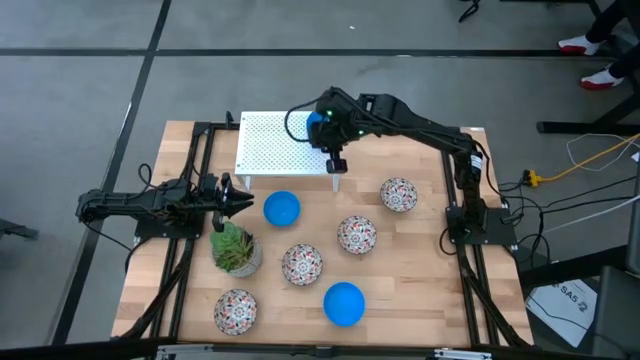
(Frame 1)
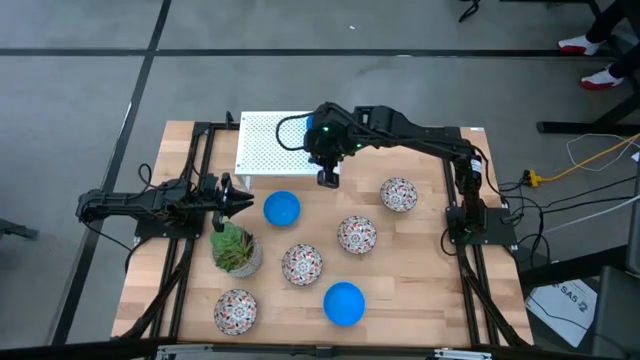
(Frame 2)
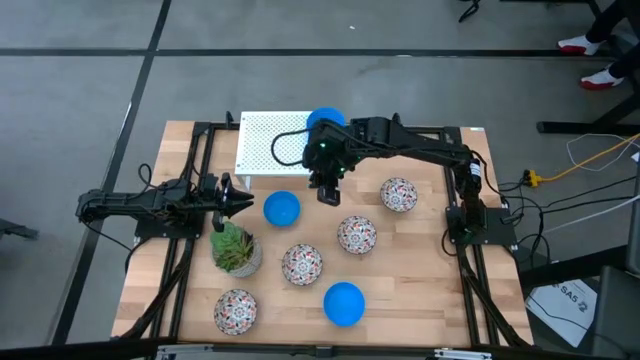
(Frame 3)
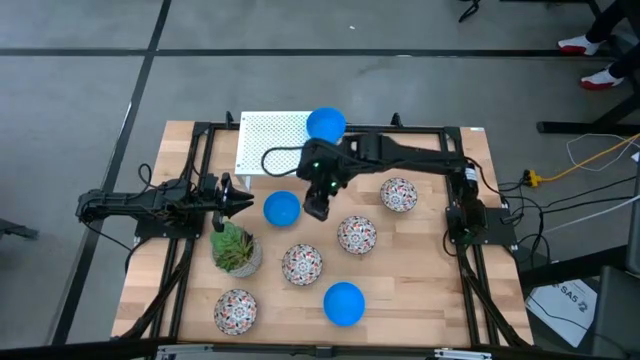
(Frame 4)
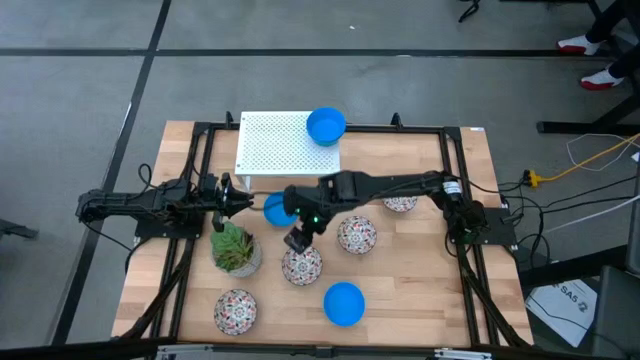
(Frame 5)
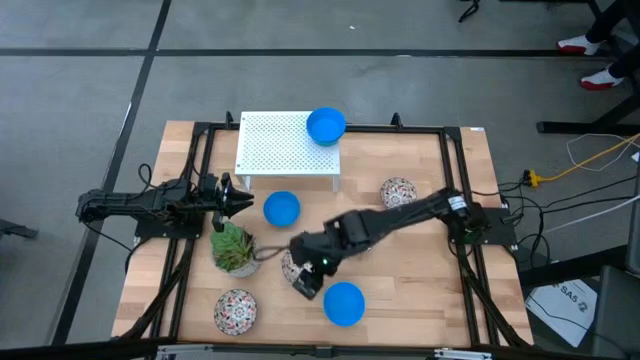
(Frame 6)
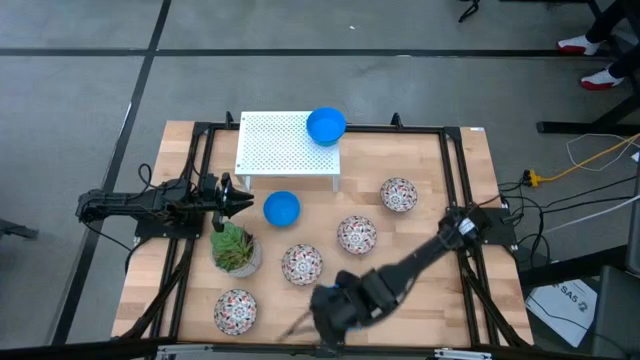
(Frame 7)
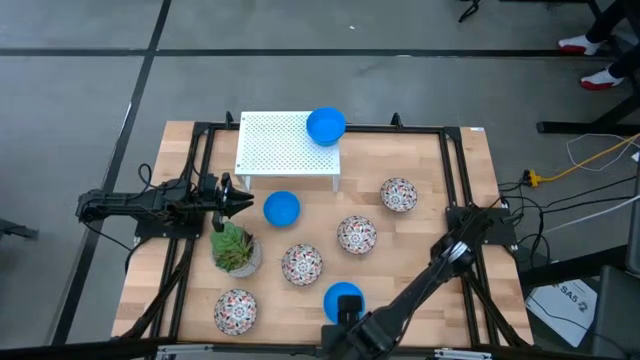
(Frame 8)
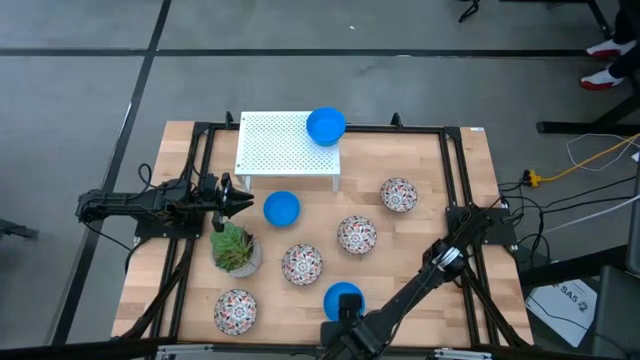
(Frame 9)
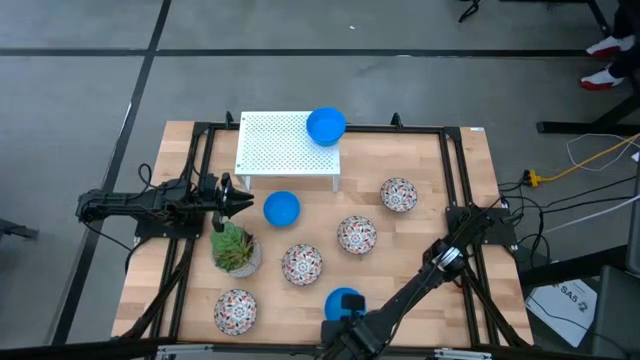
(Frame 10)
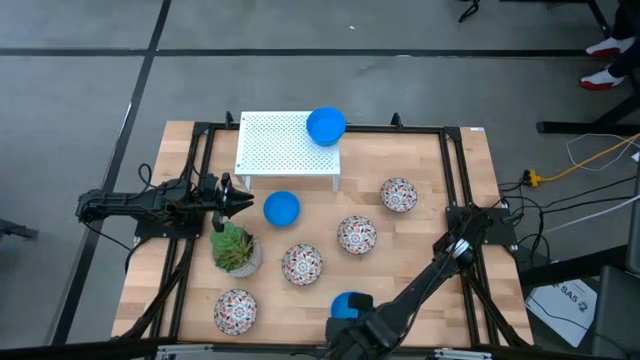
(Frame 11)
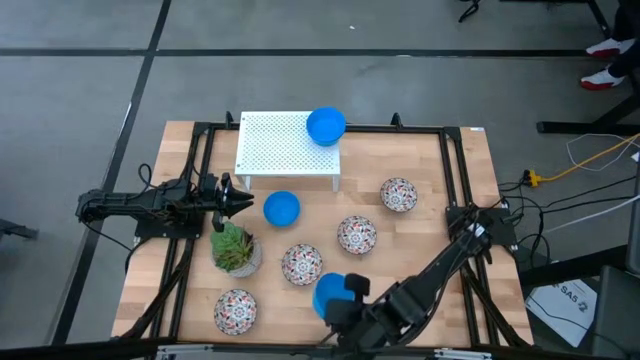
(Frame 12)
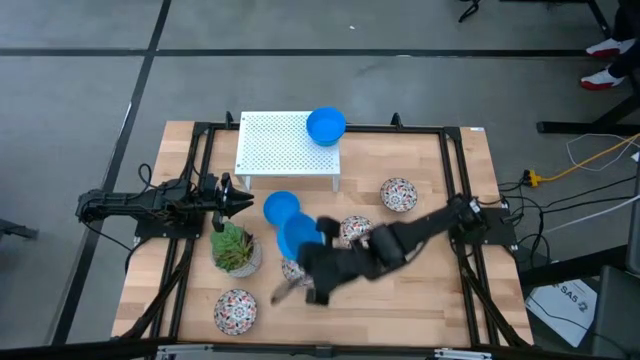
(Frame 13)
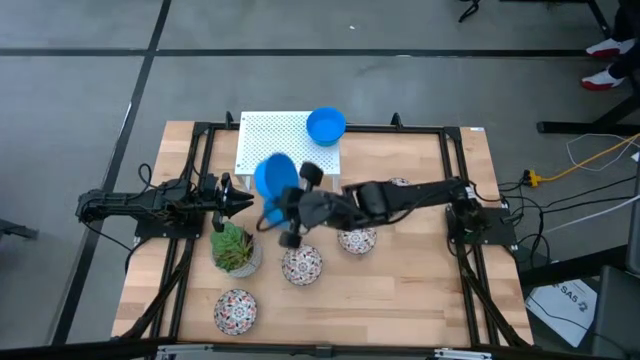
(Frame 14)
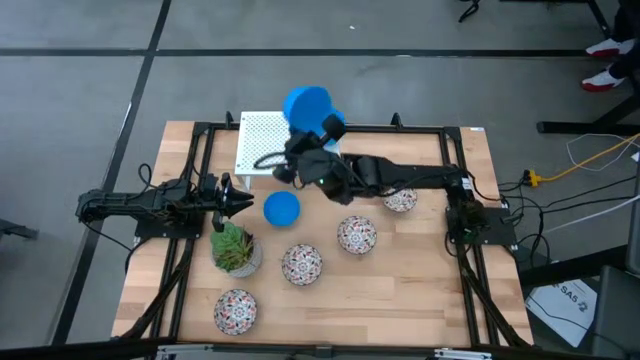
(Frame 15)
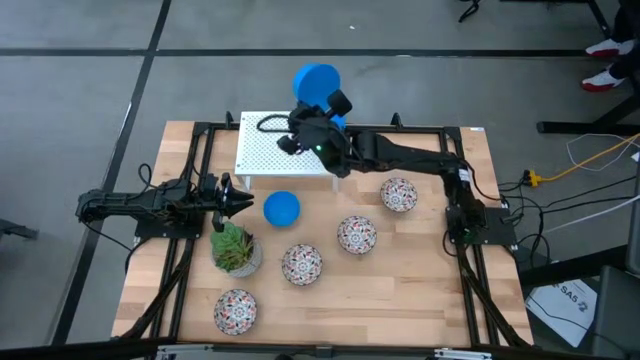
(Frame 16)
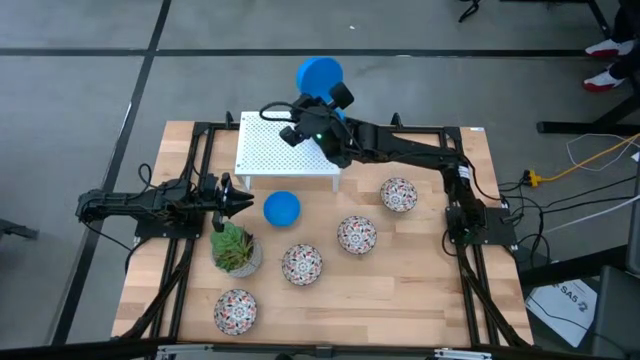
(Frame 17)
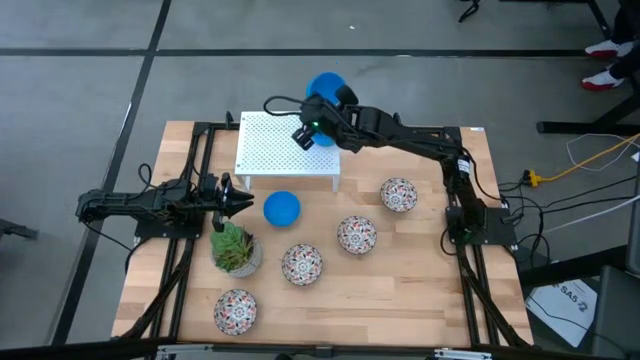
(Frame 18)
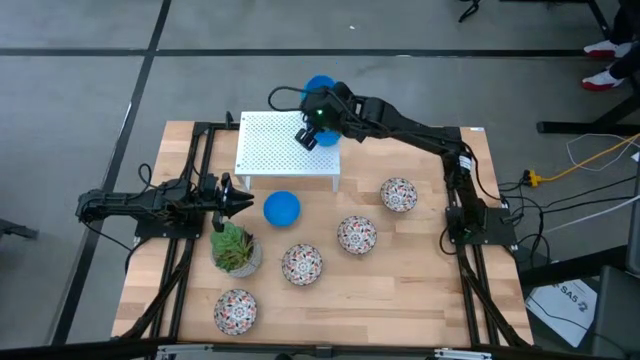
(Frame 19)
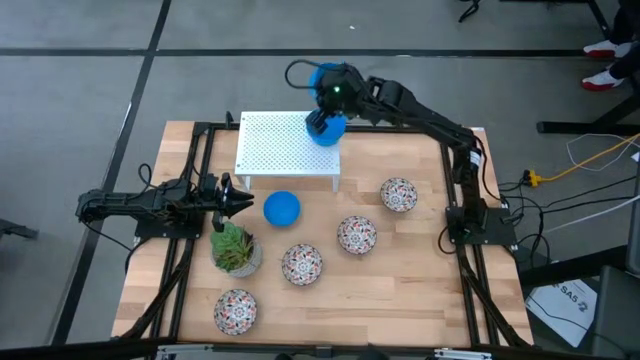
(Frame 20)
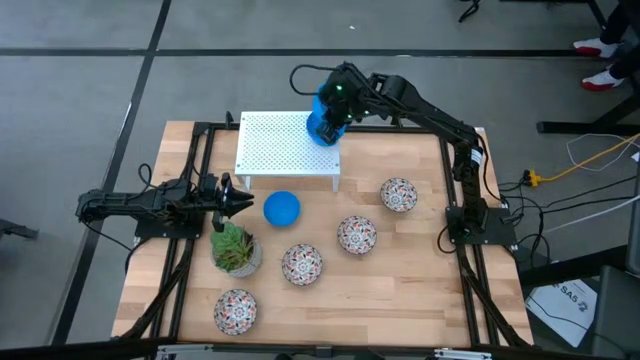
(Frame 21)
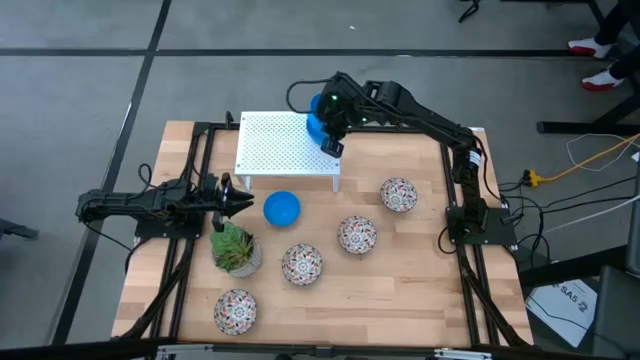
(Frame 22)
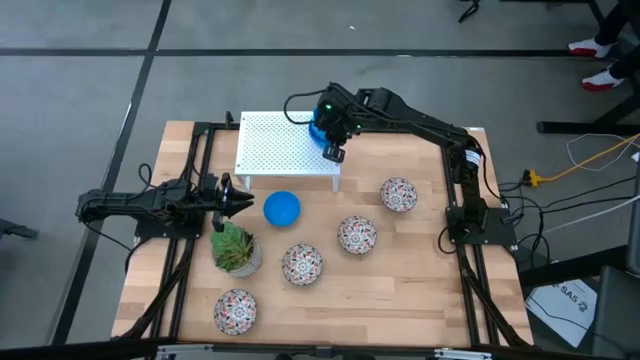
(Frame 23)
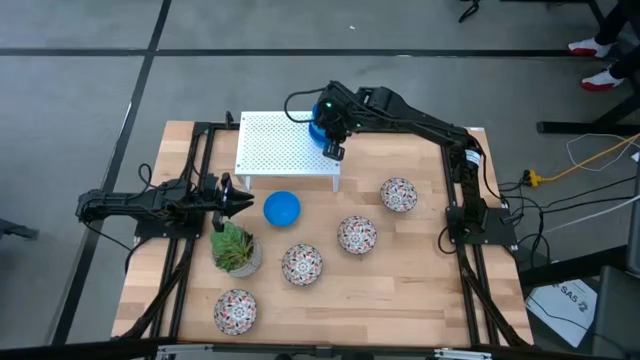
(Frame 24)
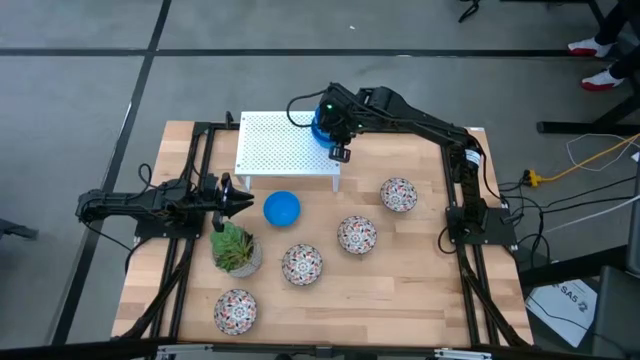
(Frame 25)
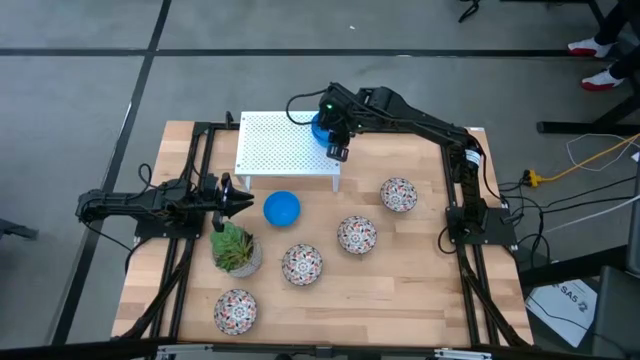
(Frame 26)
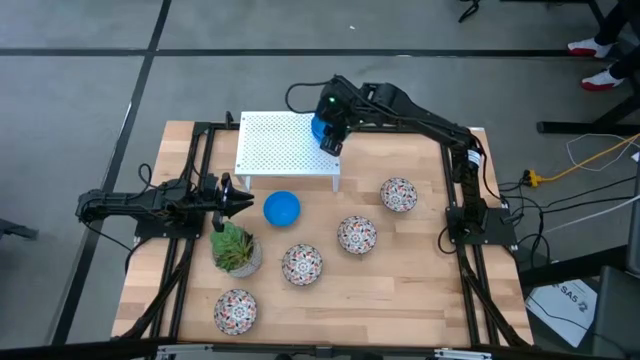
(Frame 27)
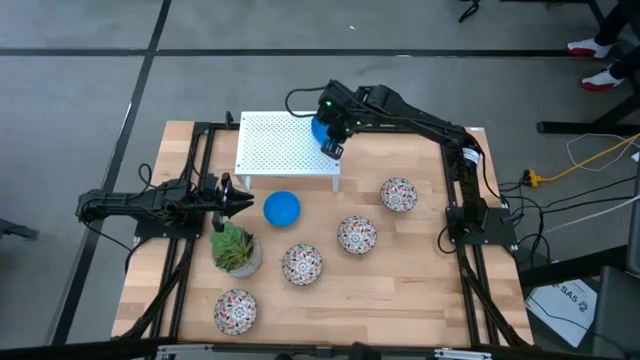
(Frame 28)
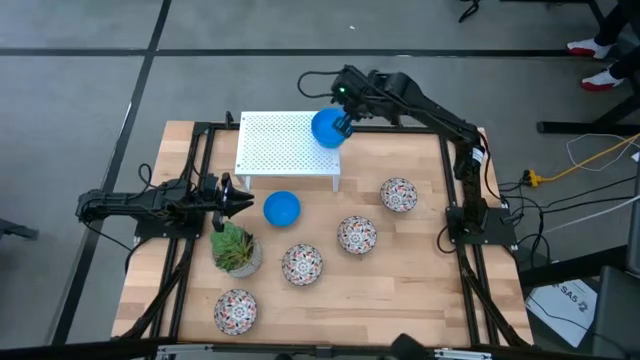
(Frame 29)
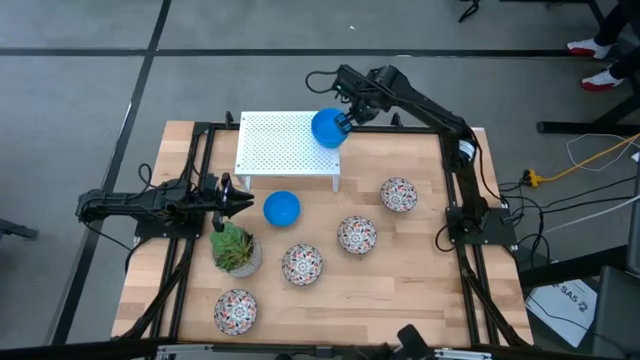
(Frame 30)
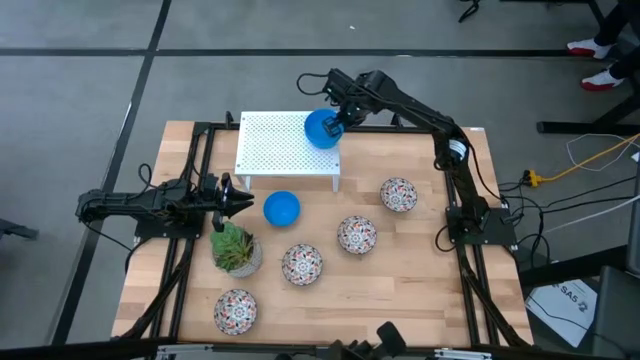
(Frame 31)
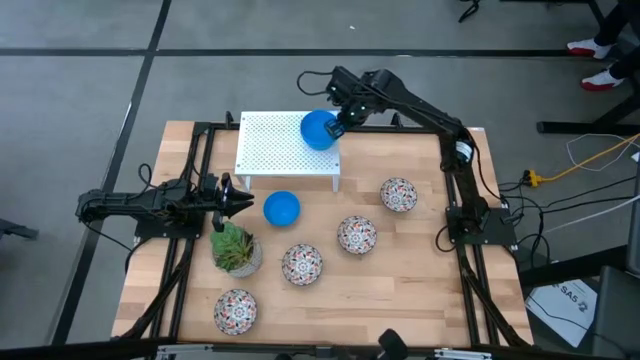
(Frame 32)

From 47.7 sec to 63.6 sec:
Task: Pick & Place Mini bowls
Stack the blue bowl on the blue bowl on the shelf
